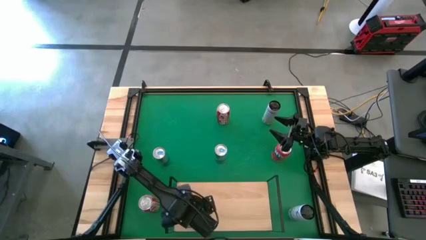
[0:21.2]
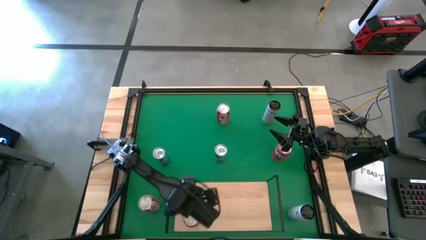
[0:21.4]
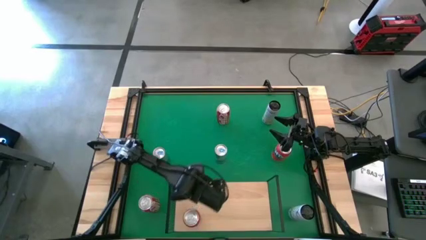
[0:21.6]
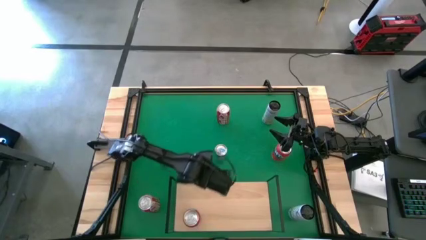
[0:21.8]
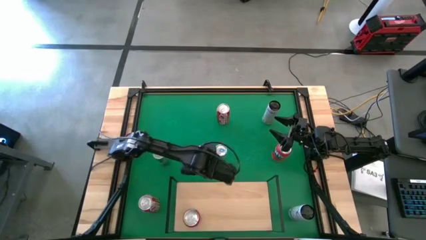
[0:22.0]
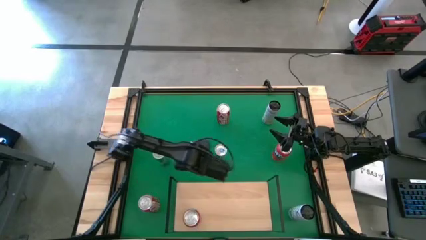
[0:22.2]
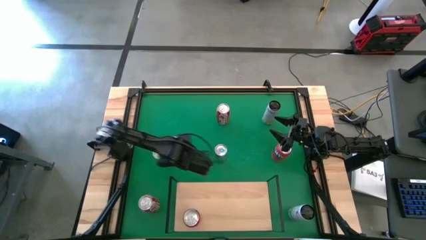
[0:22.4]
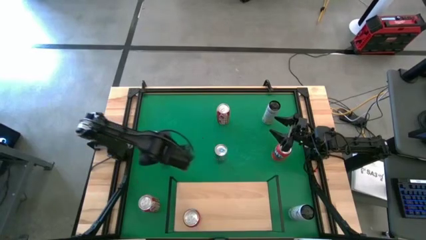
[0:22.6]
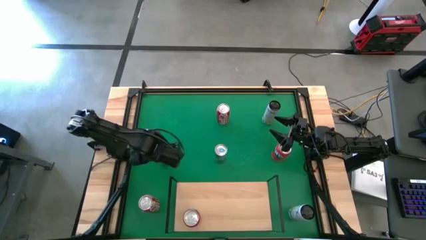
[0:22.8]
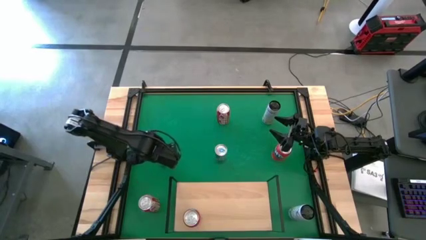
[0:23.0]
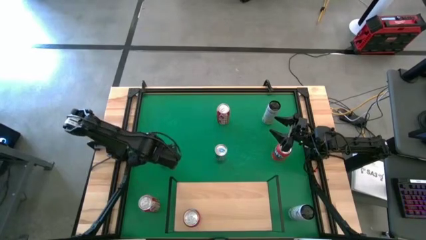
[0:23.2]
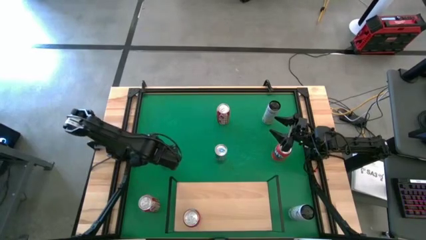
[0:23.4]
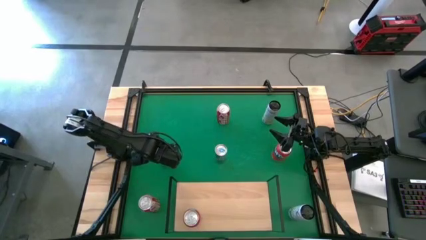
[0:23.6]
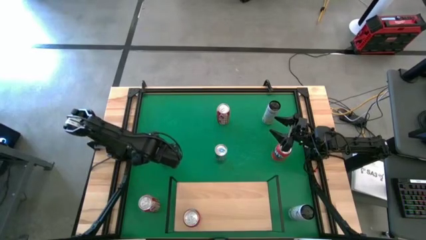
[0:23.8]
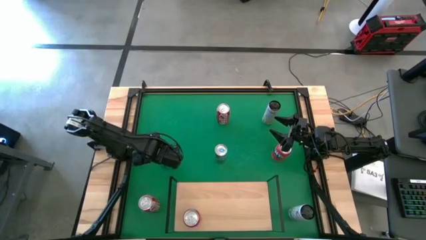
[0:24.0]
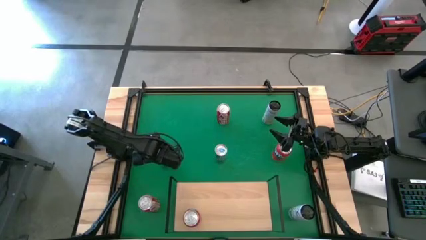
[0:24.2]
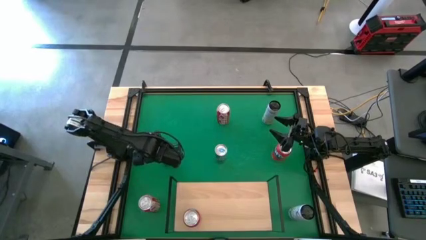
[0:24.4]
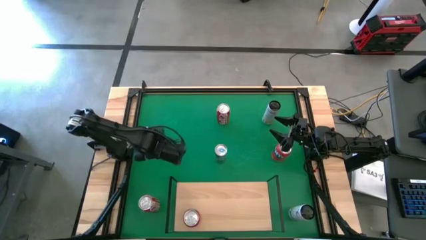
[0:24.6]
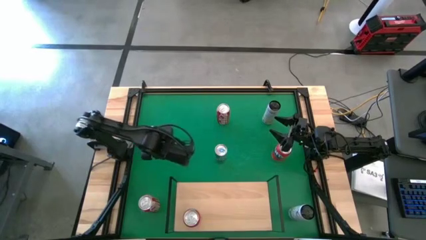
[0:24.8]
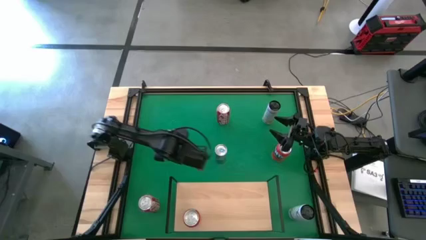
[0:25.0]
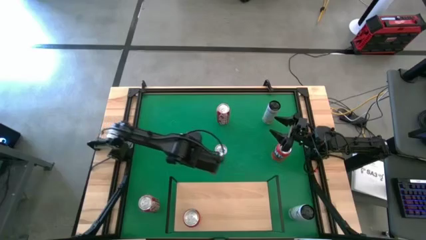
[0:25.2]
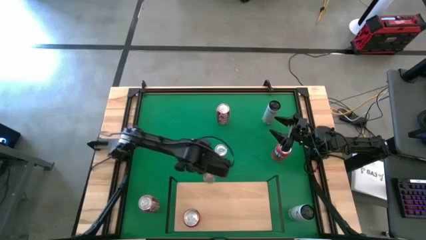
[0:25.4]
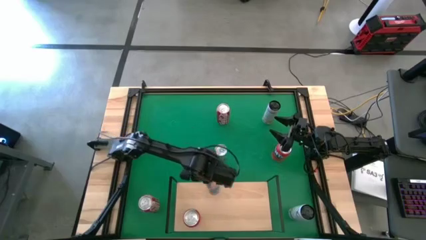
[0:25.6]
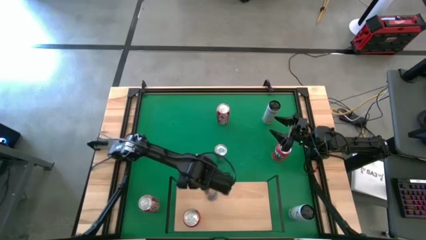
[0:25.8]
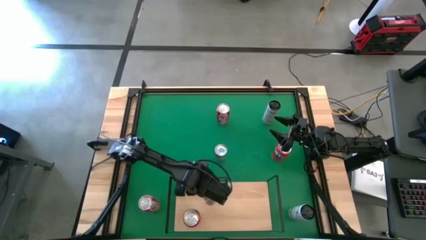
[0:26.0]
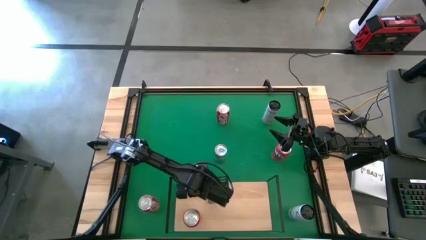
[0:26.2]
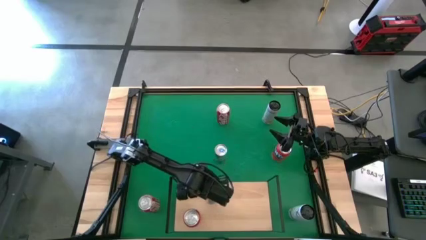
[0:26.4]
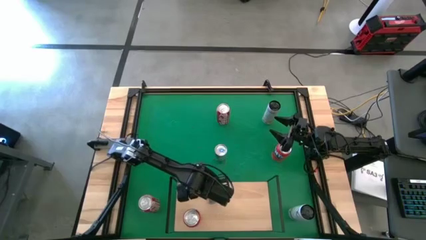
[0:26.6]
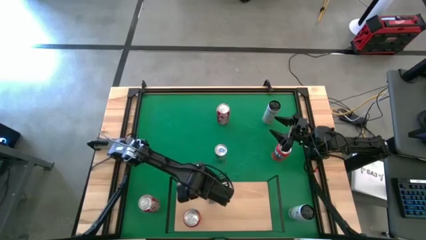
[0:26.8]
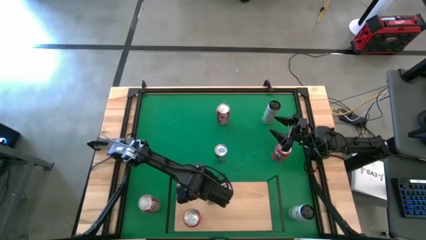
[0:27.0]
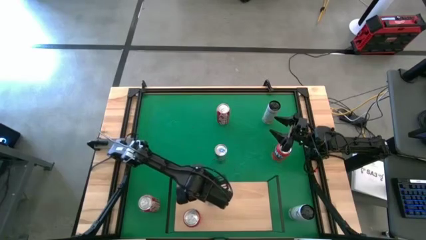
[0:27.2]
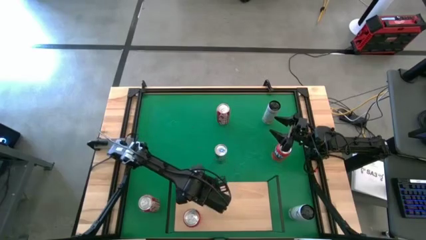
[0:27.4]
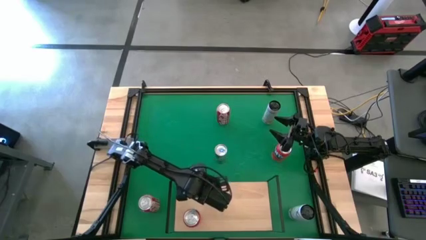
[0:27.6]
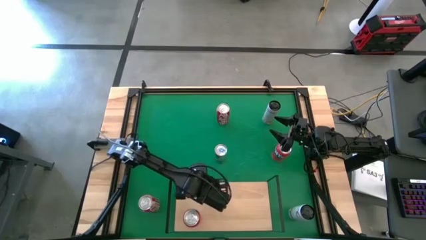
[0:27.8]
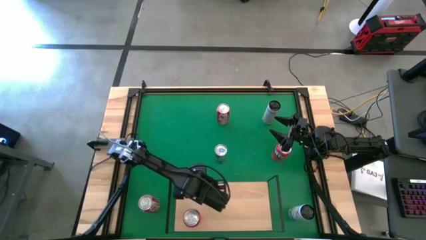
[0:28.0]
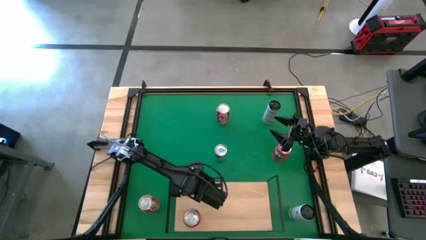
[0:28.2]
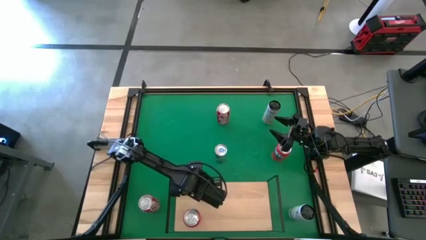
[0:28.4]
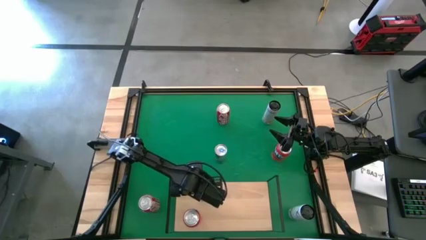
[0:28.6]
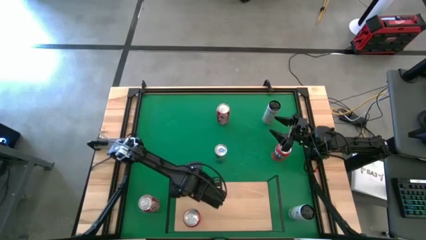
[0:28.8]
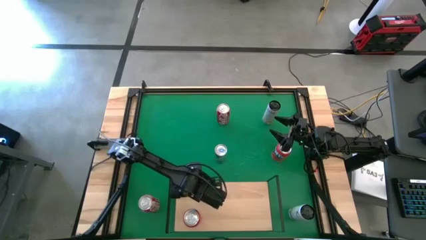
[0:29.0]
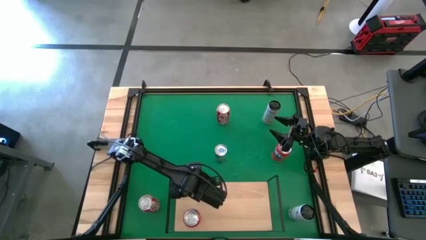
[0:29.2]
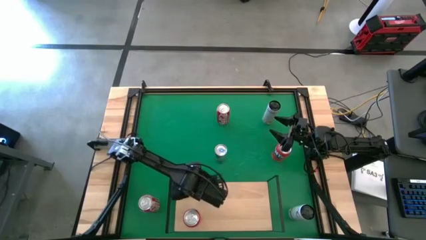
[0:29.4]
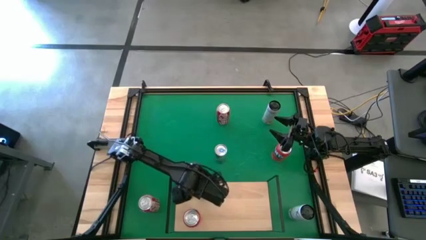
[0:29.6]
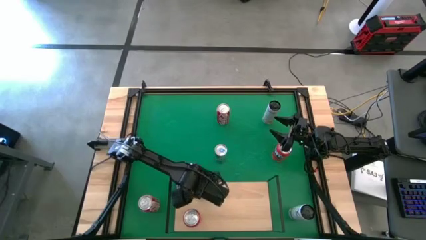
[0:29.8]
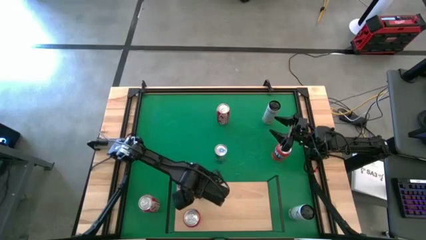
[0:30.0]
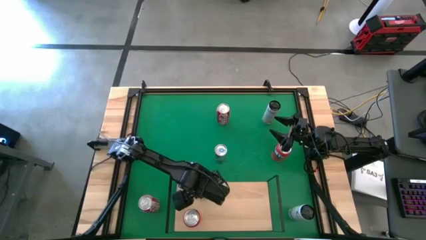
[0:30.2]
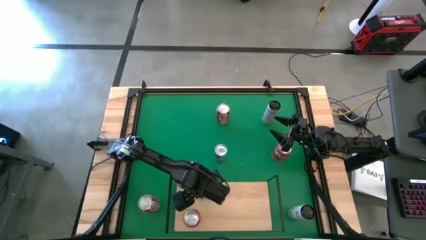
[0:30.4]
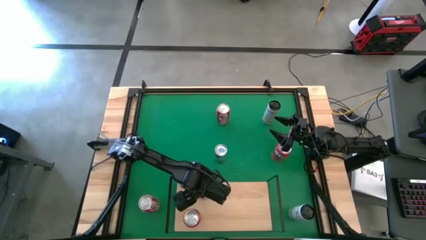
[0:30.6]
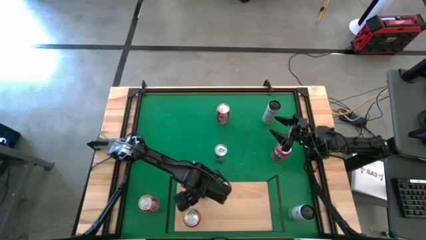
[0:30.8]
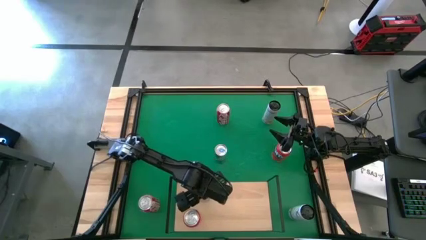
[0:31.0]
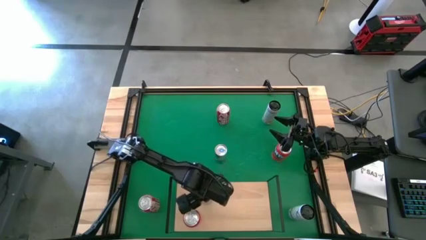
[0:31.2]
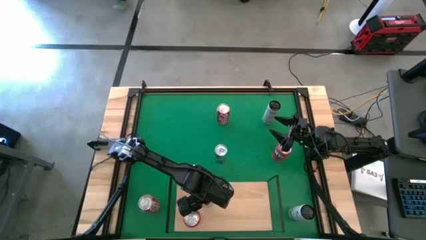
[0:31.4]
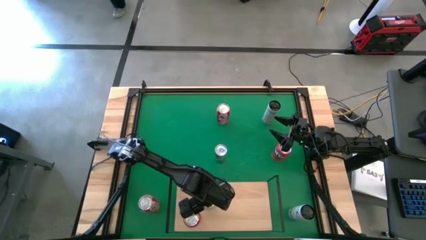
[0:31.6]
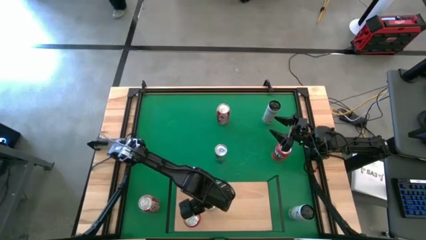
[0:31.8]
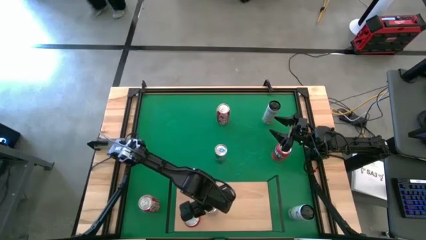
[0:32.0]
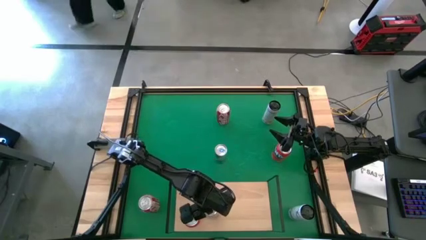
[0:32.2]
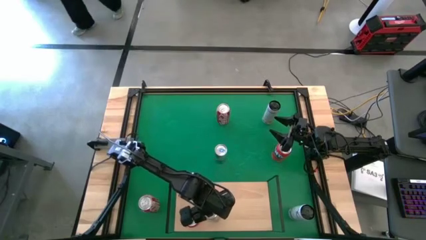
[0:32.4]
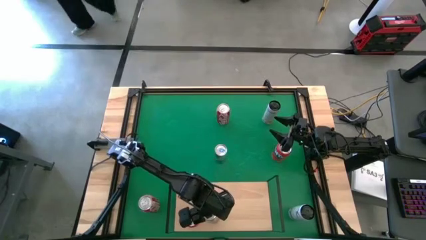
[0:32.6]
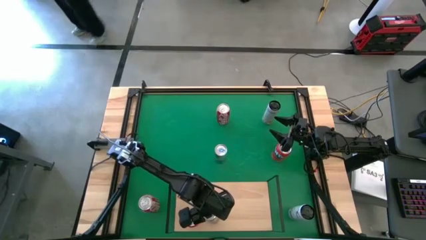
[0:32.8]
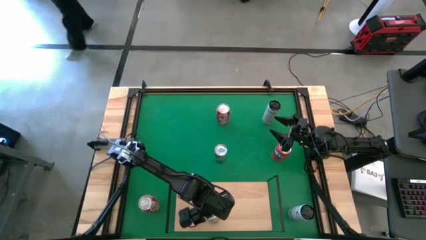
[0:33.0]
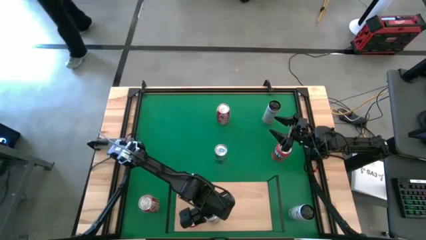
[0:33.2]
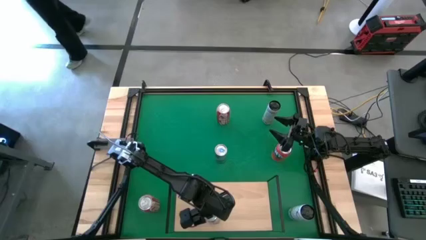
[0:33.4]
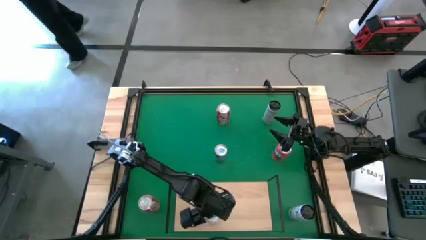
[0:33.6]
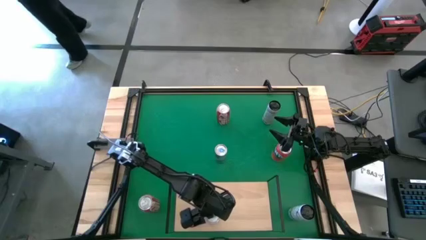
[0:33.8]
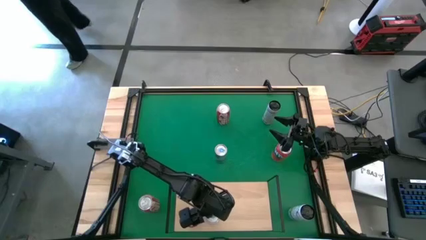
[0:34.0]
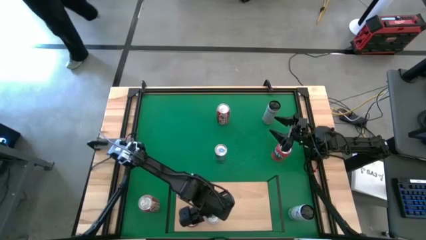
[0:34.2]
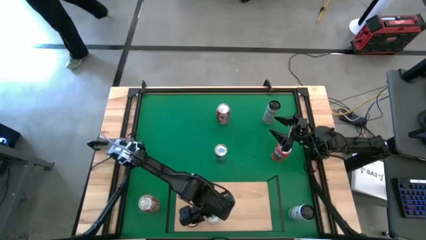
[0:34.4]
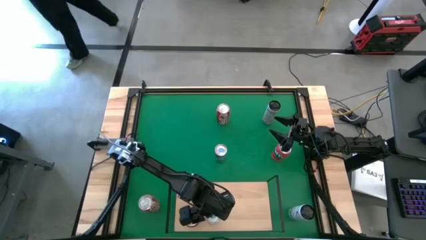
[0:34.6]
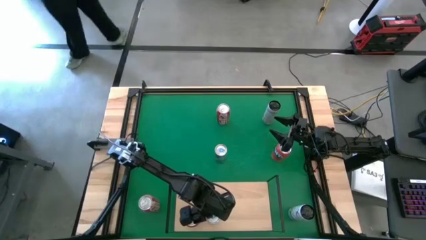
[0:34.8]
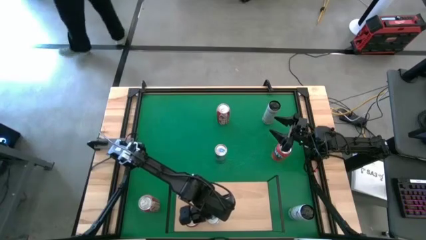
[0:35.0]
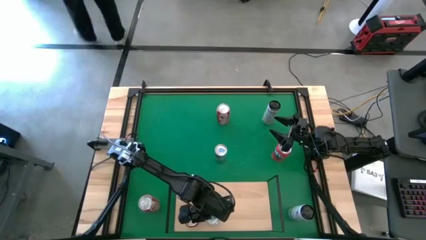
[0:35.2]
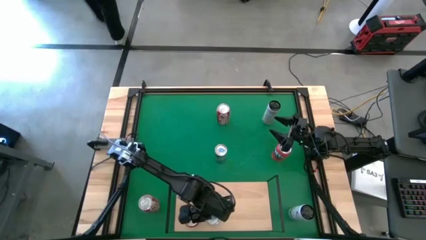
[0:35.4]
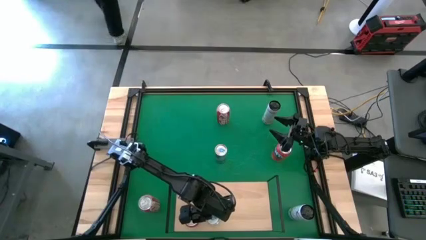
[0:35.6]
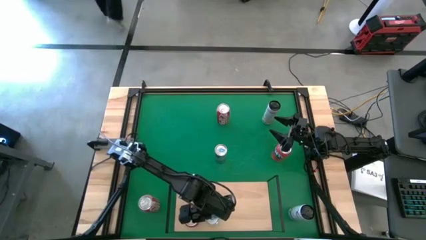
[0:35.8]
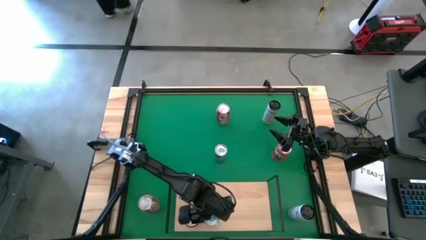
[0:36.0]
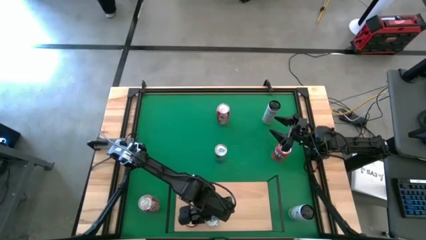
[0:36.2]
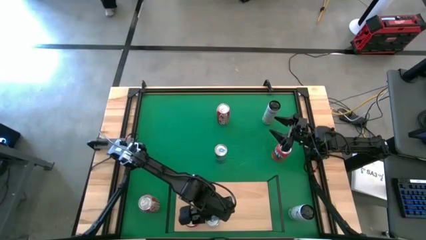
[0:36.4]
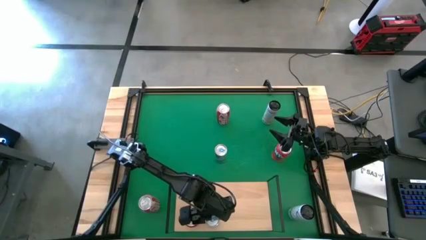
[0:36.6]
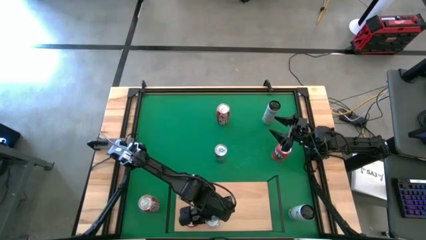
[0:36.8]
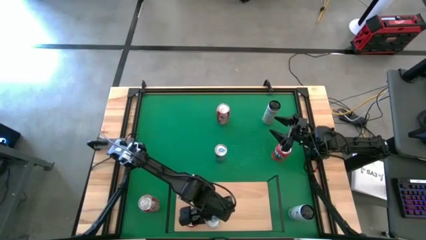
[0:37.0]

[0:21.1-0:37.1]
Task: Place canned beverage on shelf
Put the left blue soda can on the shelf
